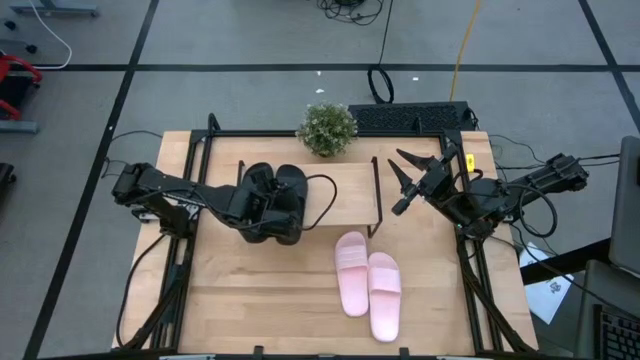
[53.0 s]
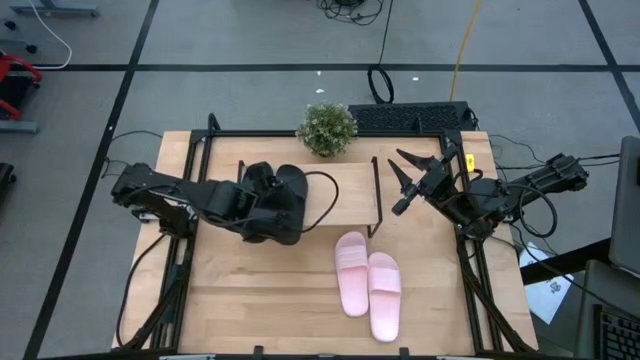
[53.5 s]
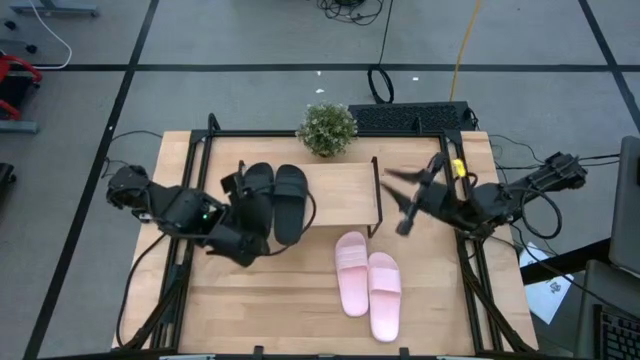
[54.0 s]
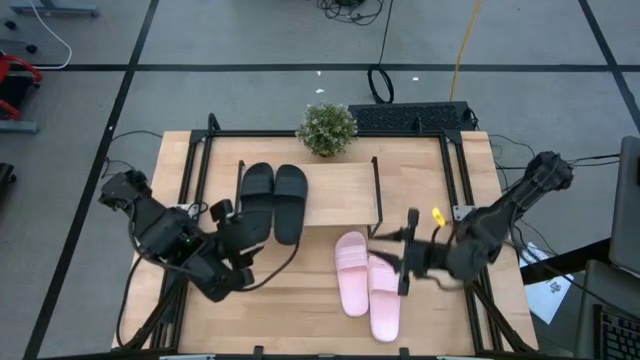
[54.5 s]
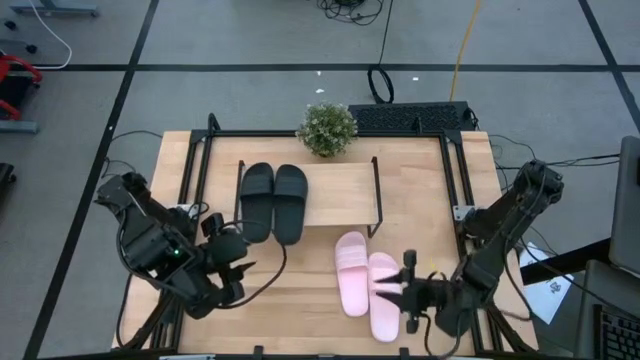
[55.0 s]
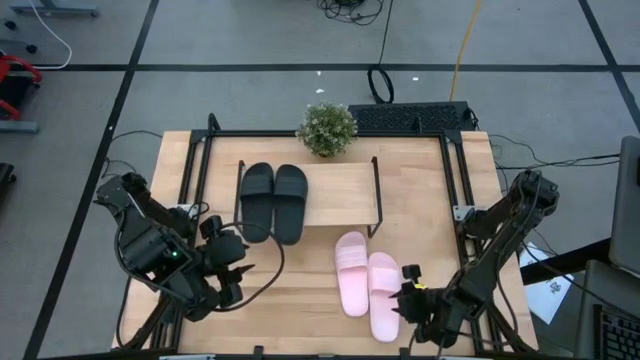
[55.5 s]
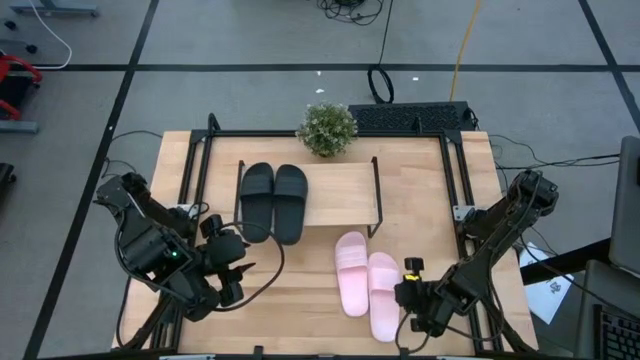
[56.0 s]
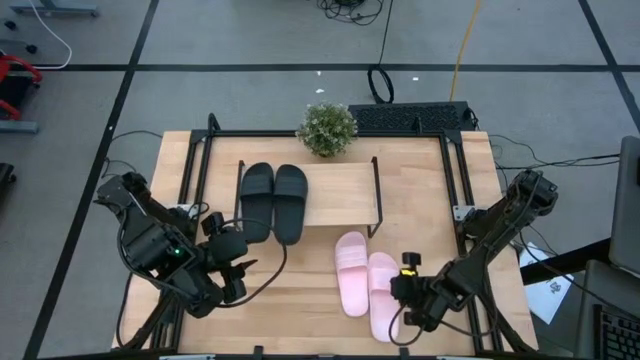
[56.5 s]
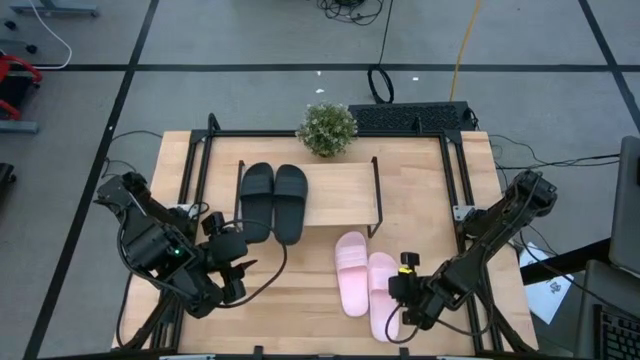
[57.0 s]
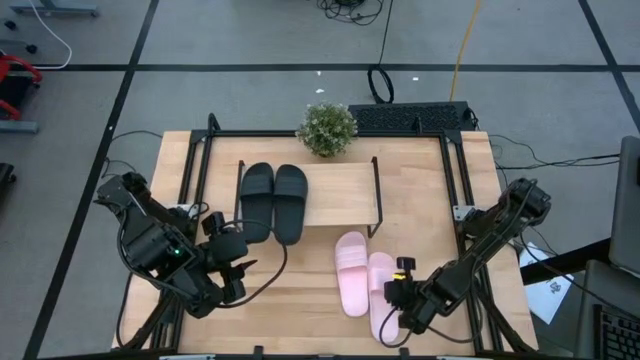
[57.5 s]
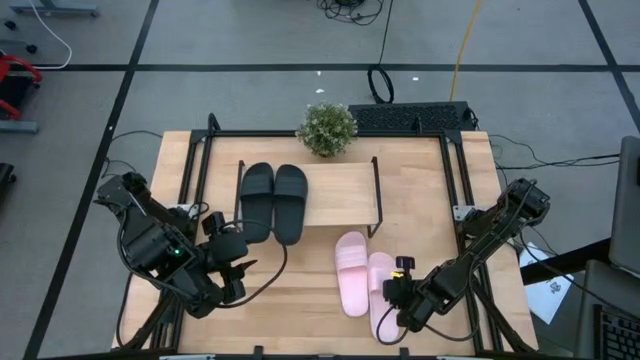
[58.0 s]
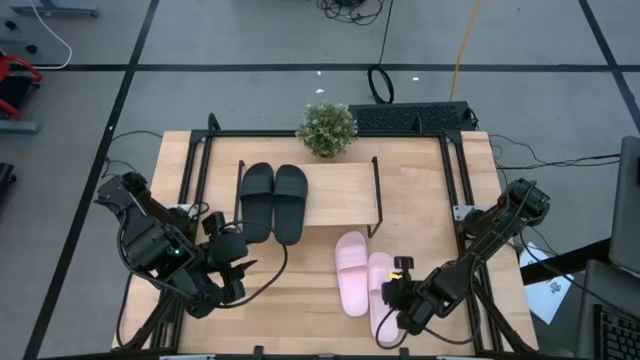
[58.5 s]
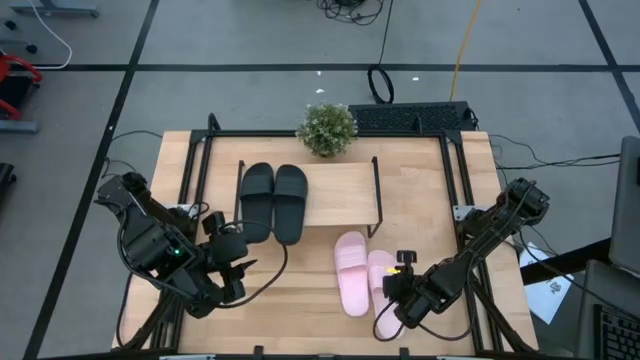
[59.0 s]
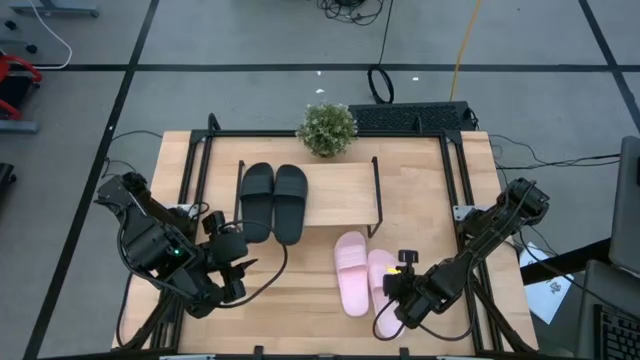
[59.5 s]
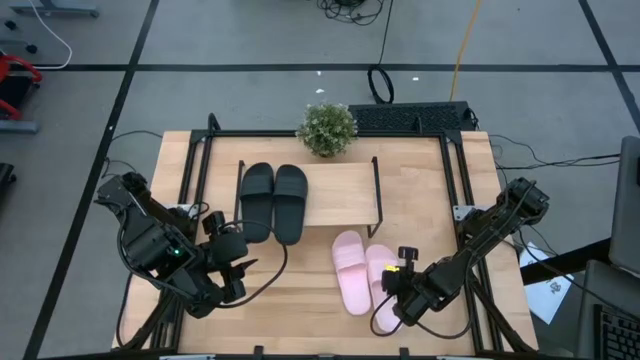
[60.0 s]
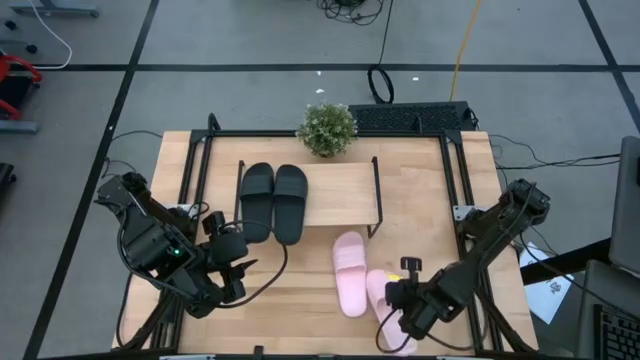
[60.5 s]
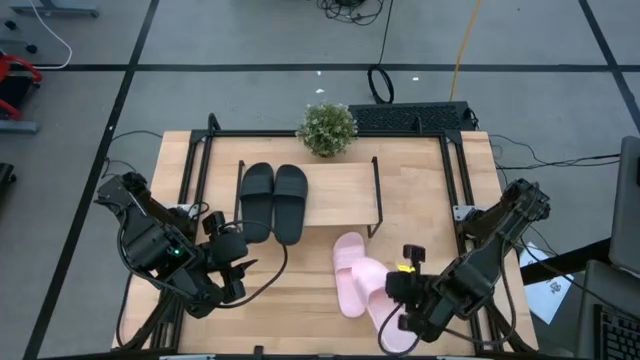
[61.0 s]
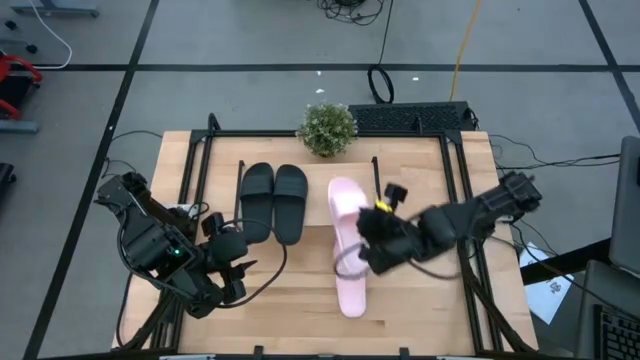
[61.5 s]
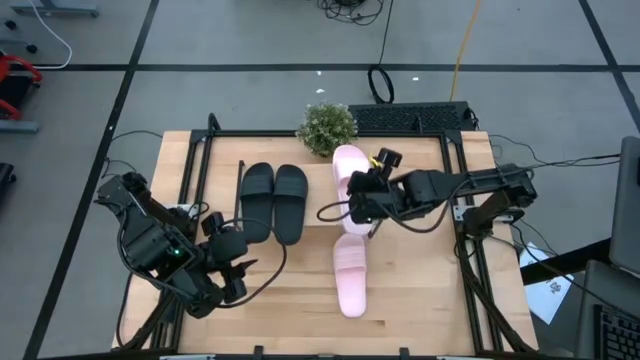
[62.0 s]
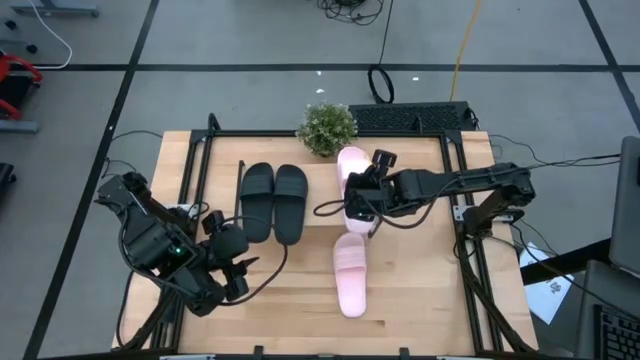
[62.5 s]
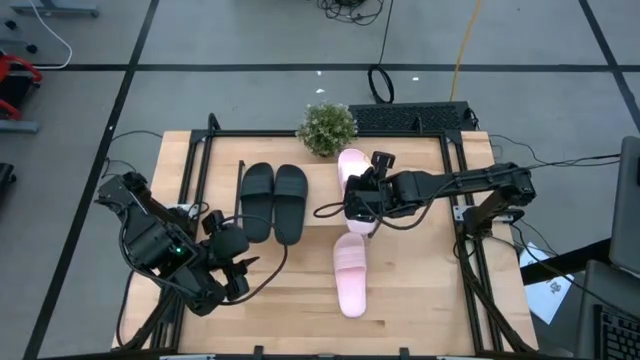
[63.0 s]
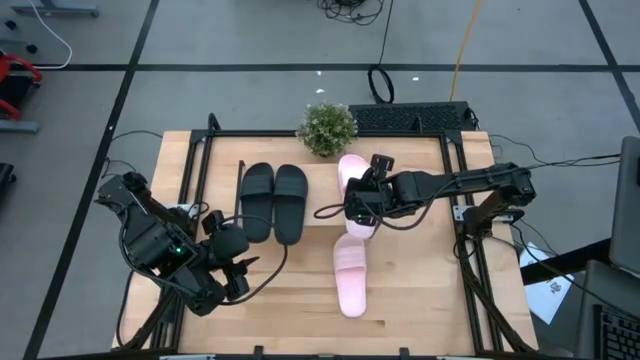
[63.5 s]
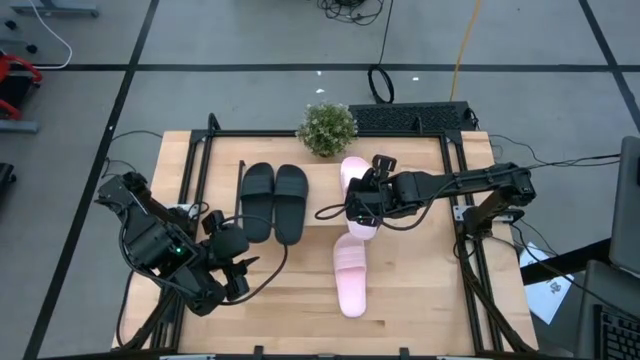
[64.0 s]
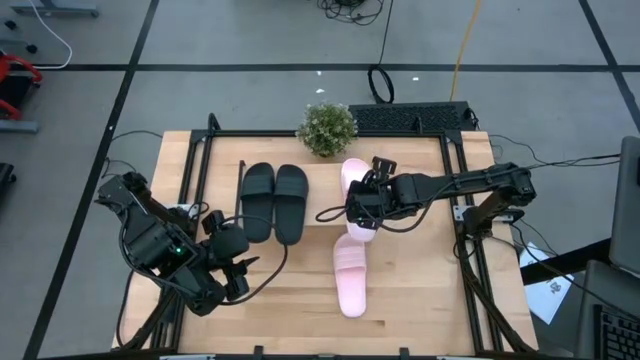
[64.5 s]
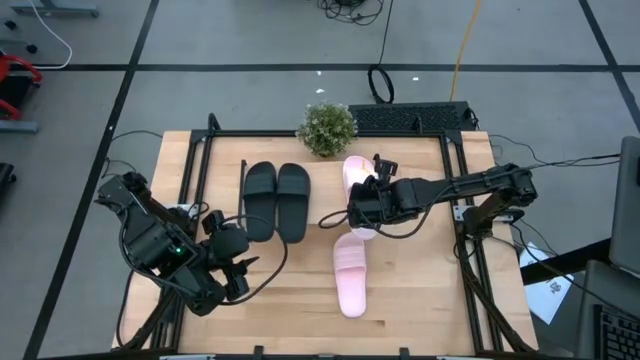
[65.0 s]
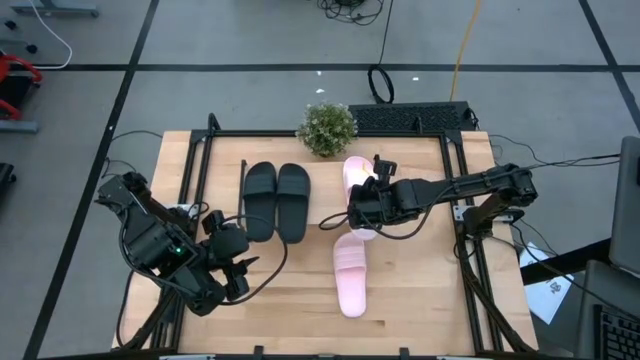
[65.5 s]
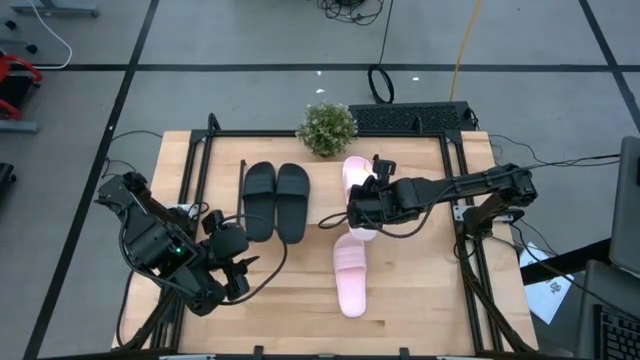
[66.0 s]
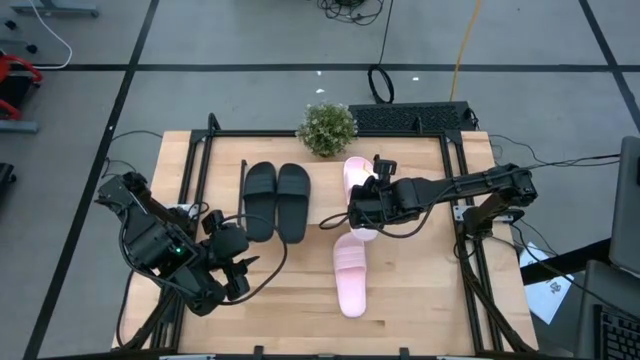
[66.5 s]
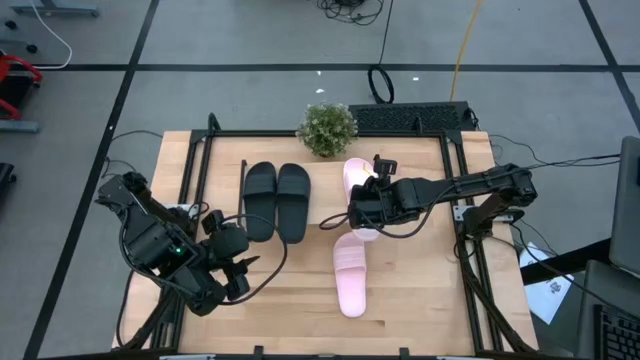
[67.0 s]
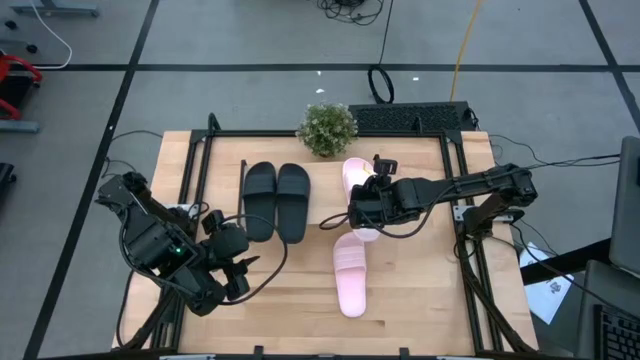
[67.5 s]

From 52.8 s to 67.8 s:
Task: Pick and place slides into the shelf
Put the pink slide on the shelf
